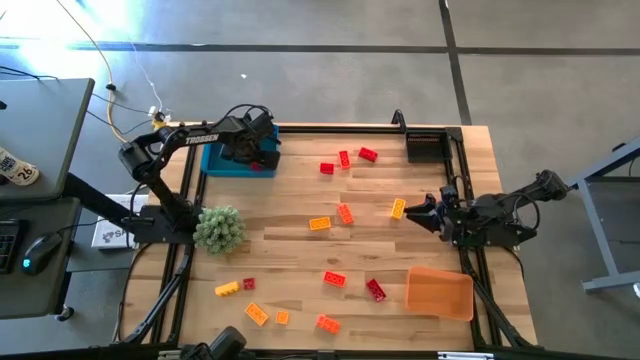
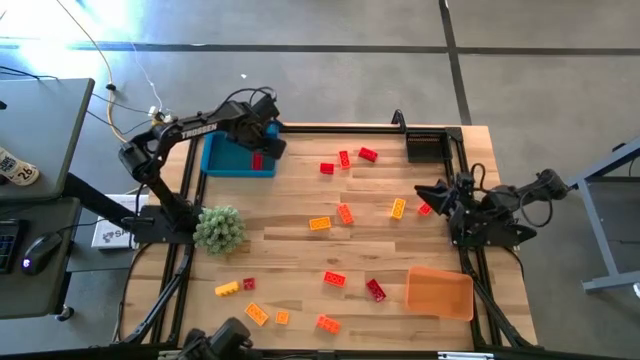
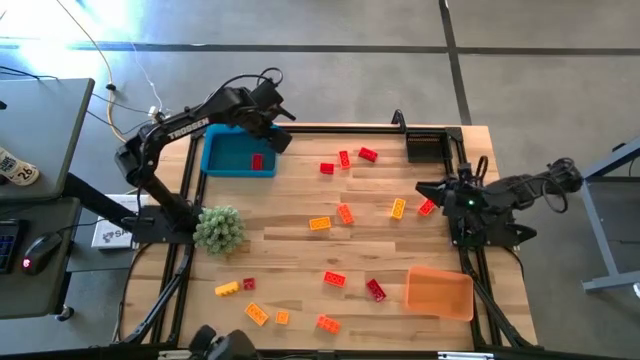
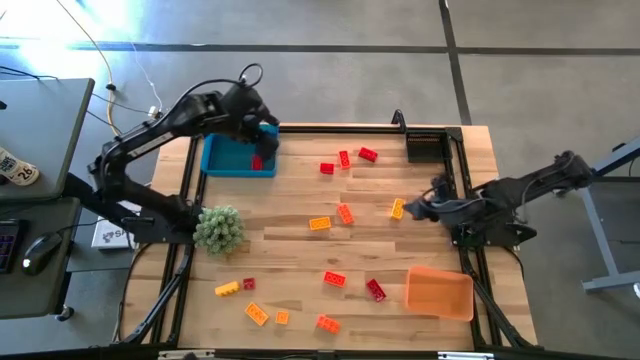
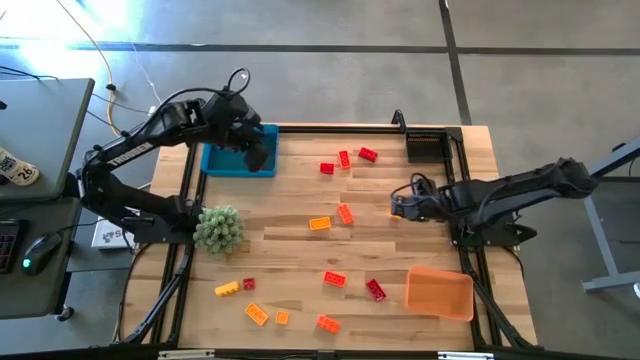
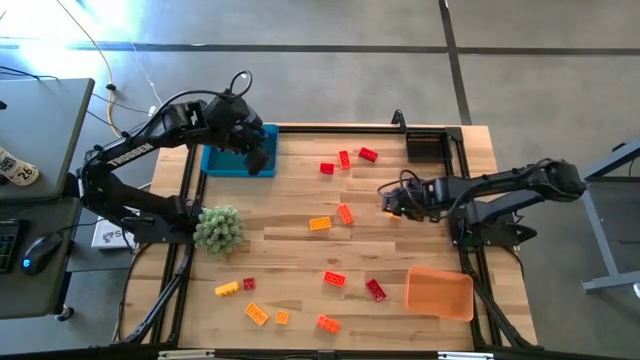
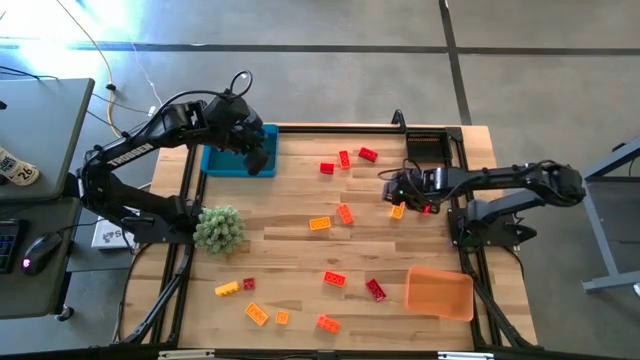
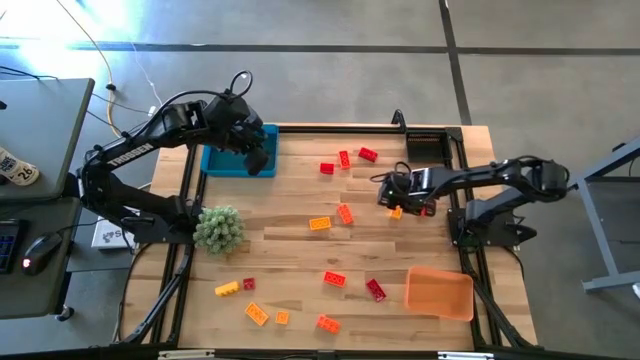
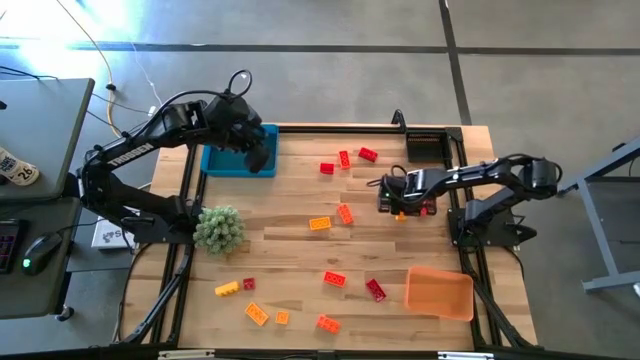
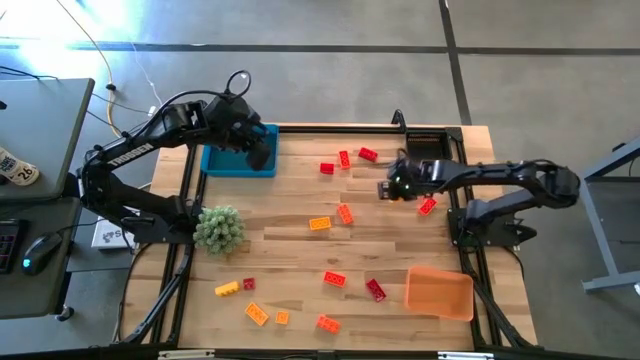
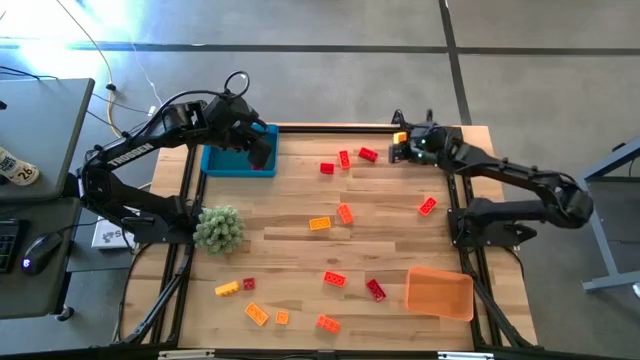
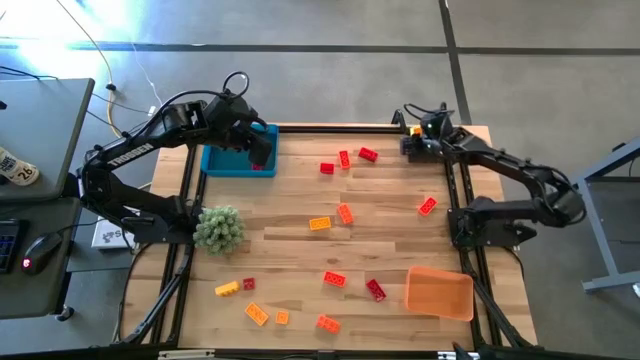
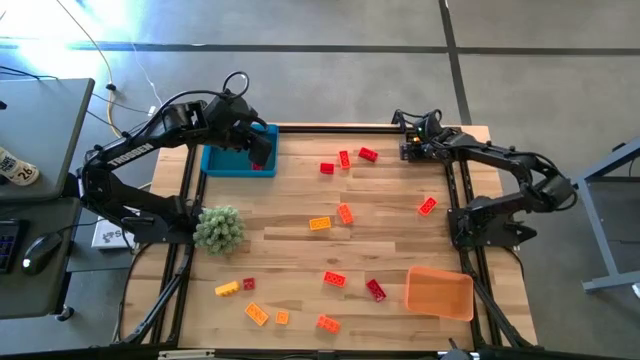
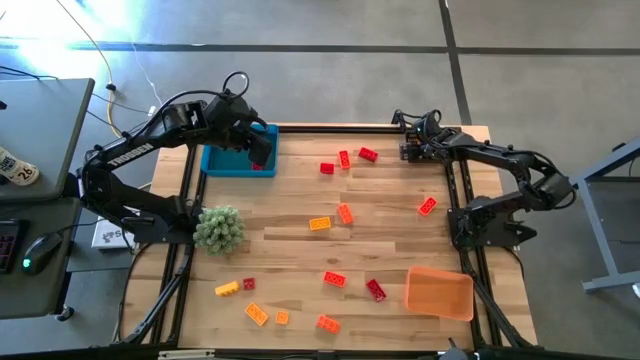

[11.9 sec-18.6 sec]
Task: Sort & place blocks by color
Put the yellow game piece into the black bin

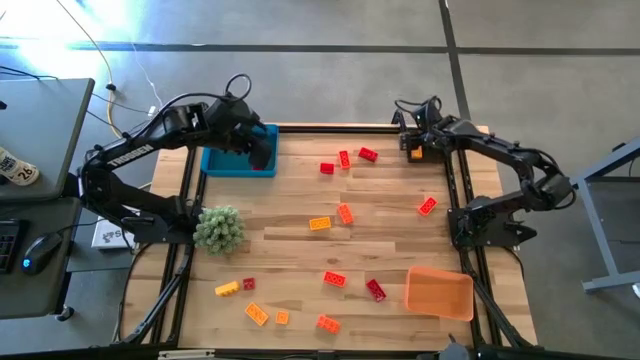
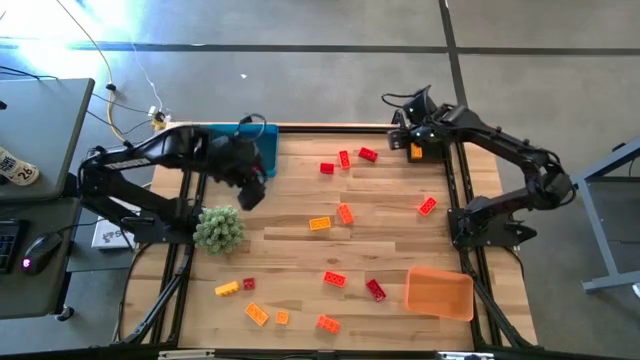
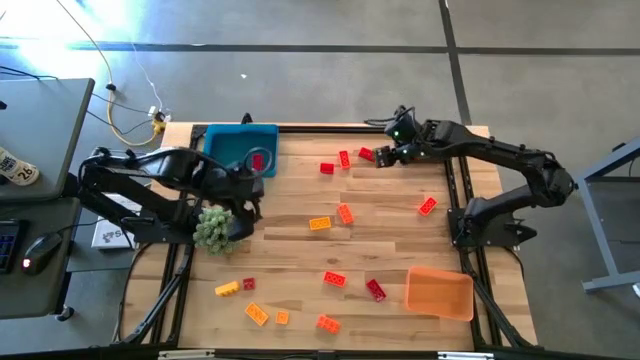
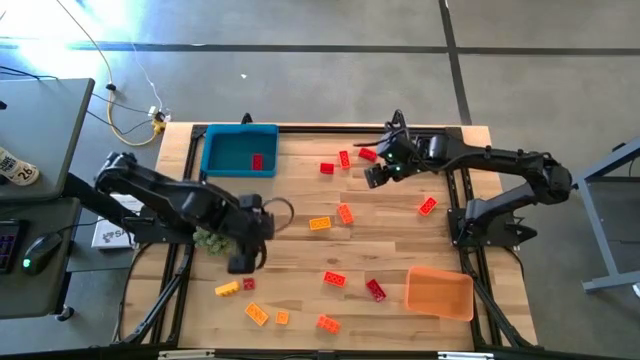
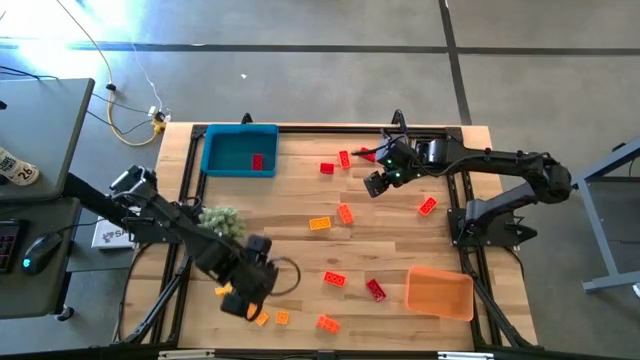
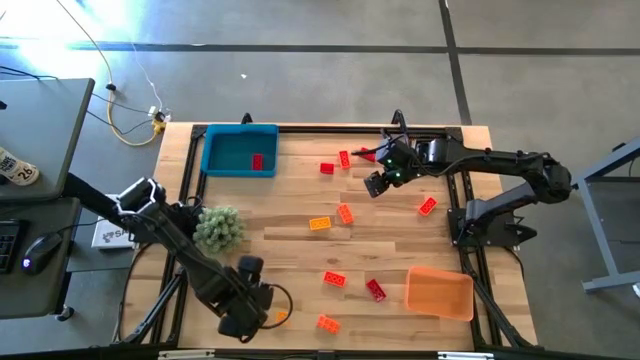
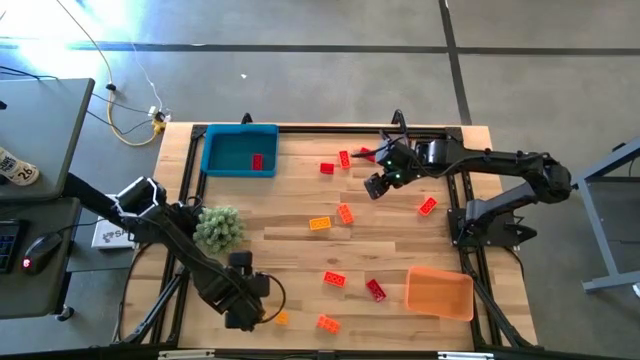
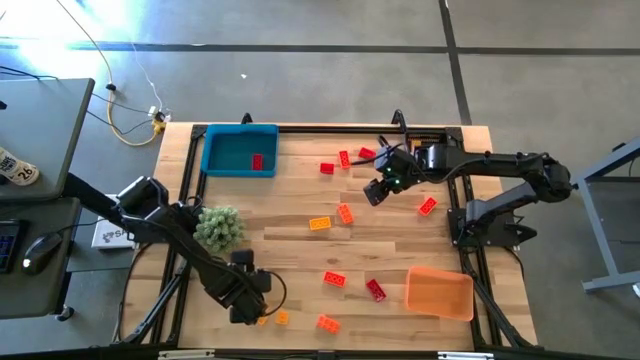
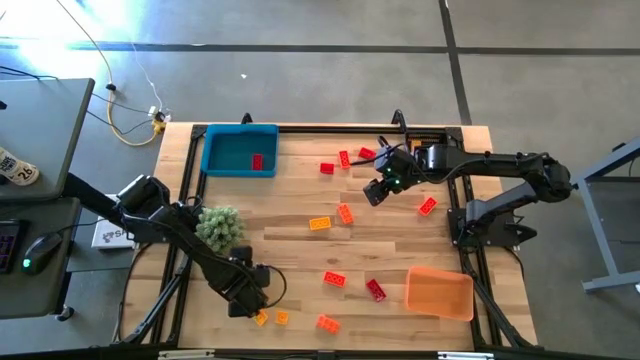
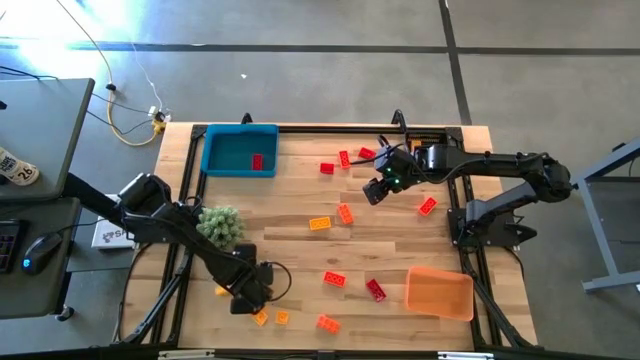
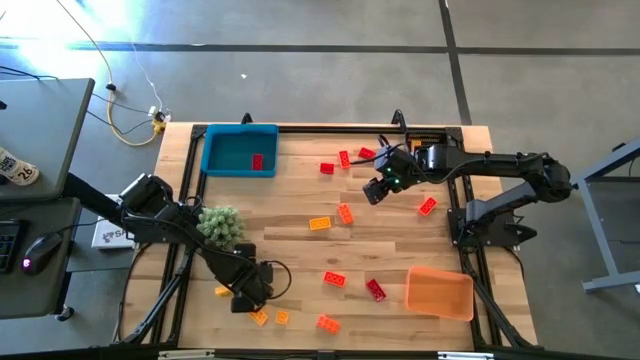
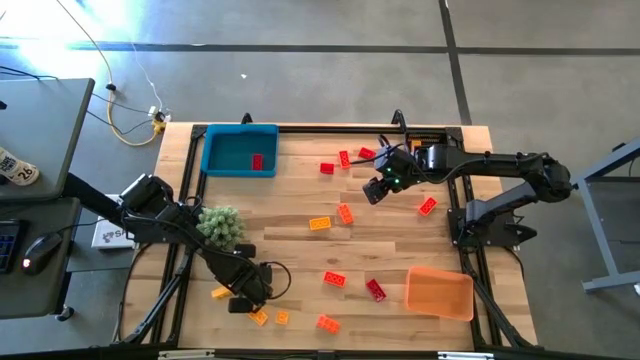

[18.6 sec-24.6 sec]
Put the red game piece into the blue bin

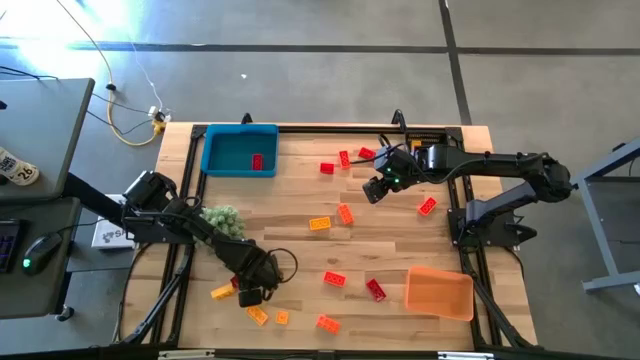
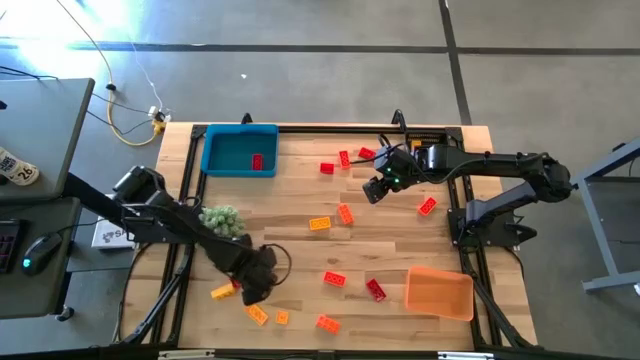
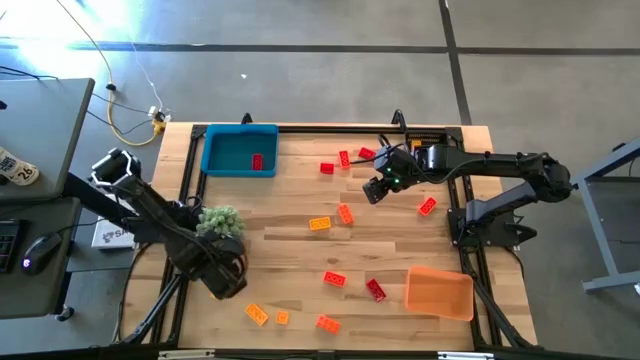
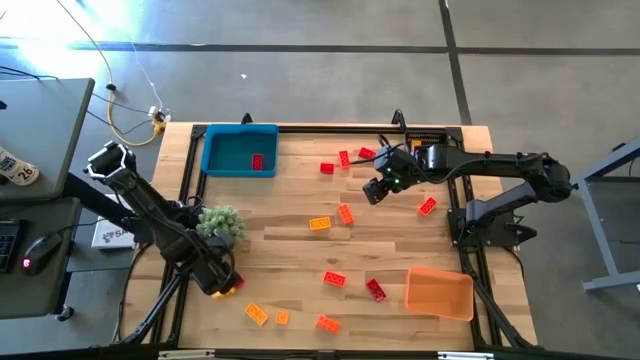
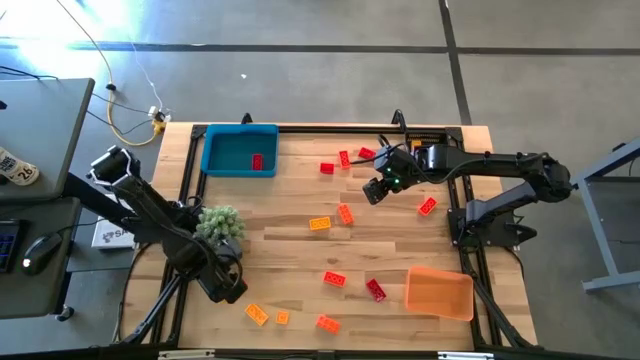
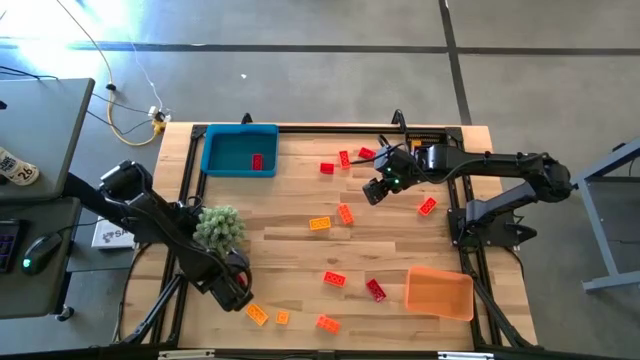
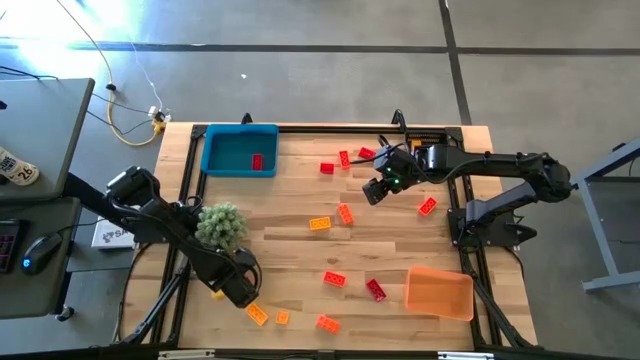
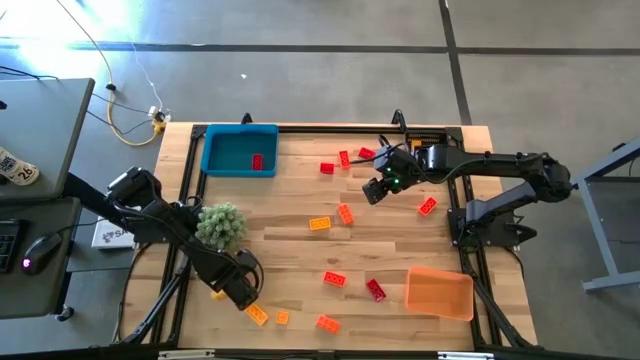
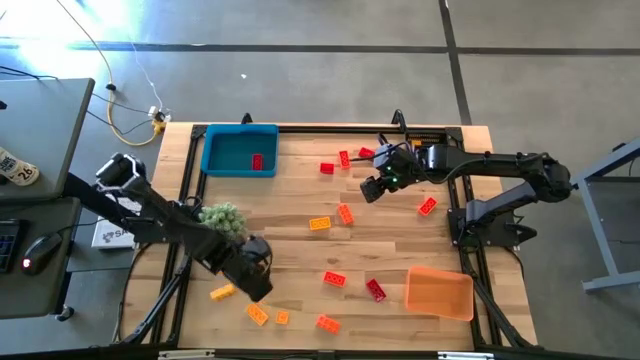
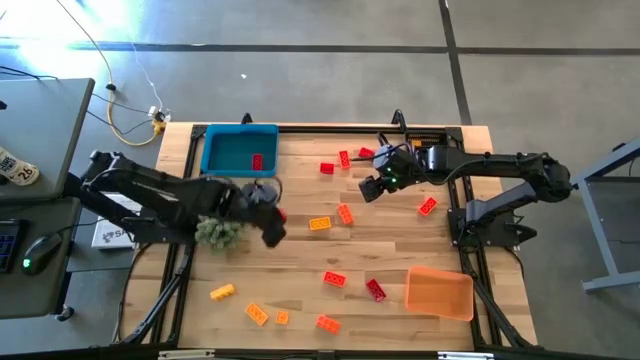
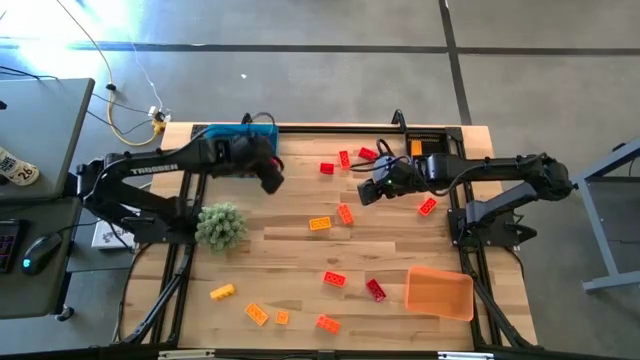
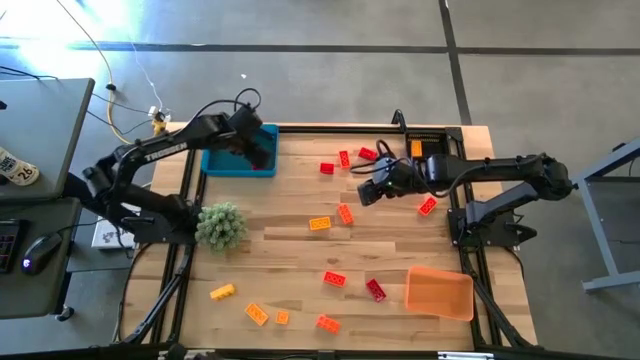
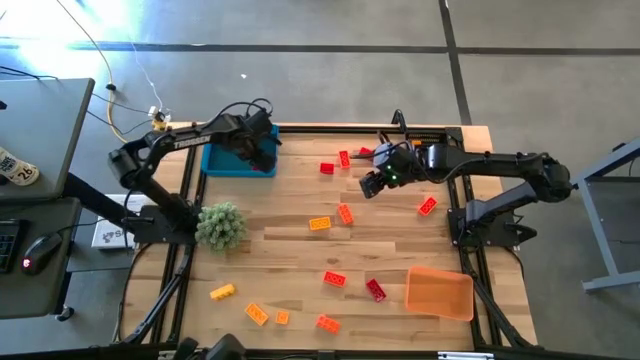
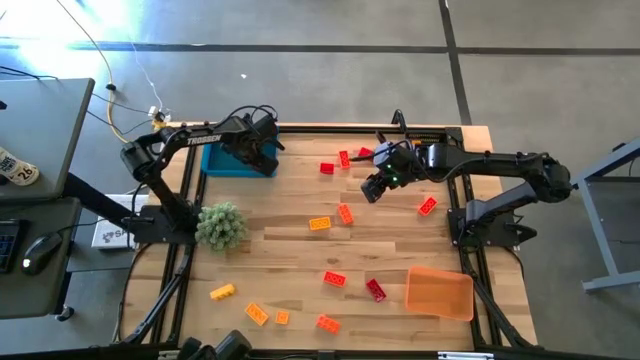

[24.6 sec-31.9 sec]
Put the red game piece into the blue bin

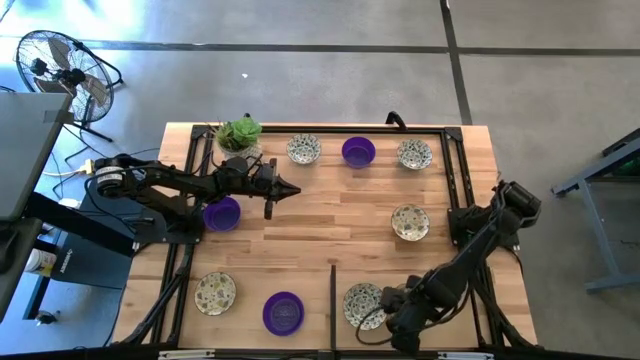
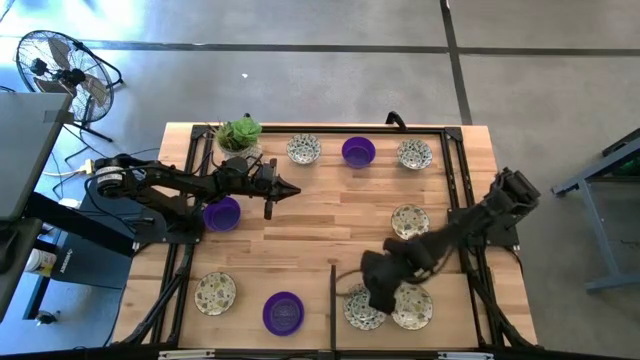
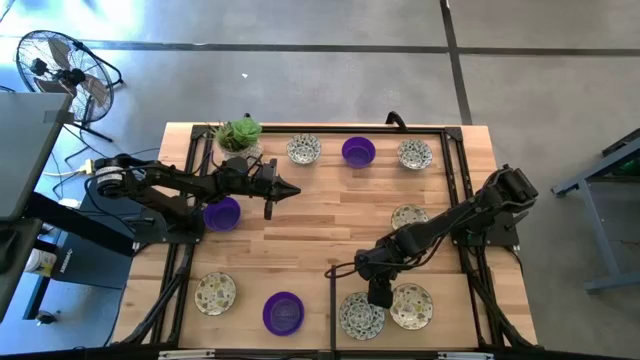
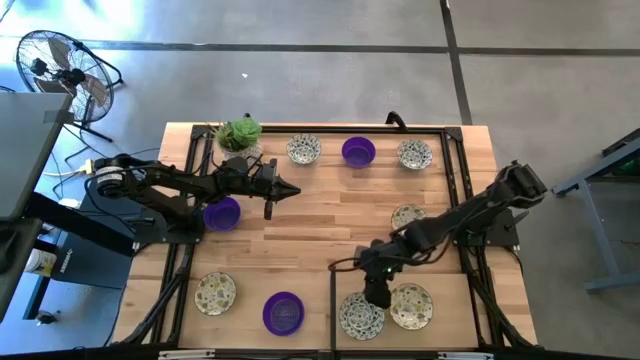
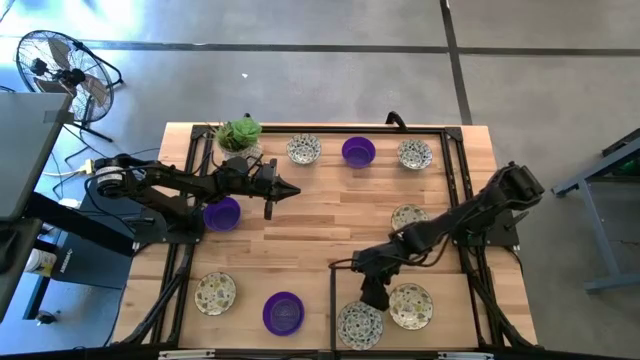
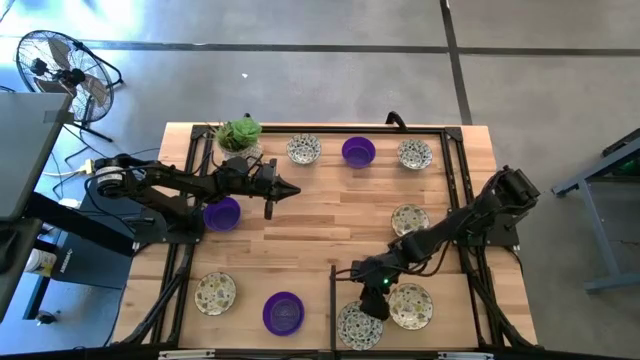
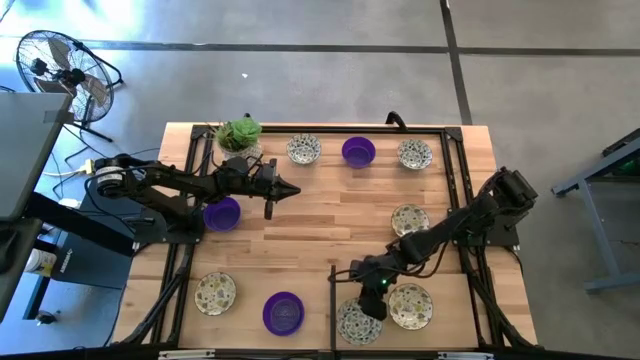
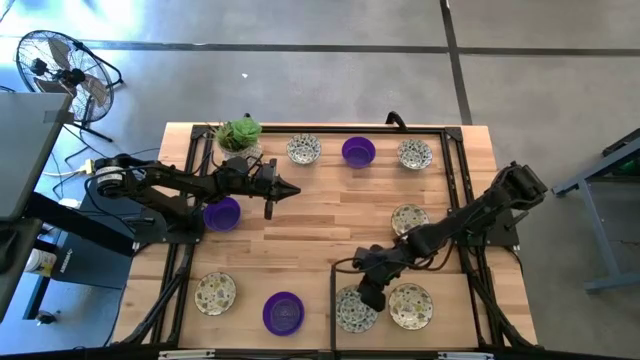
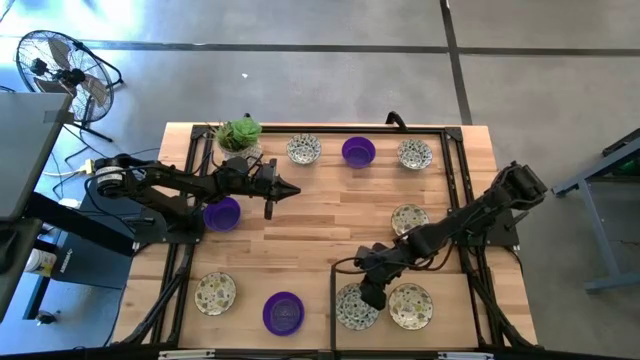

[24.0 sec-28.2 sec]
Task: Pick & Place Mini bowls
Adjust the blue patterned bowl on the shelf
